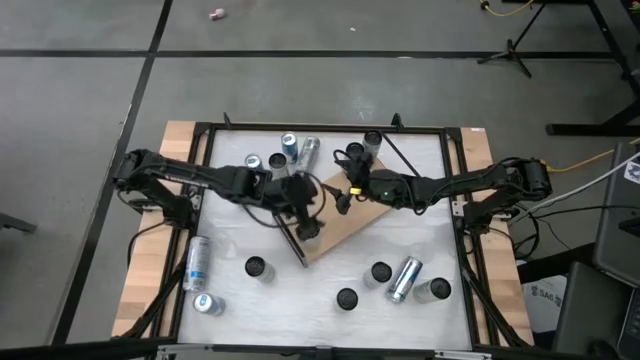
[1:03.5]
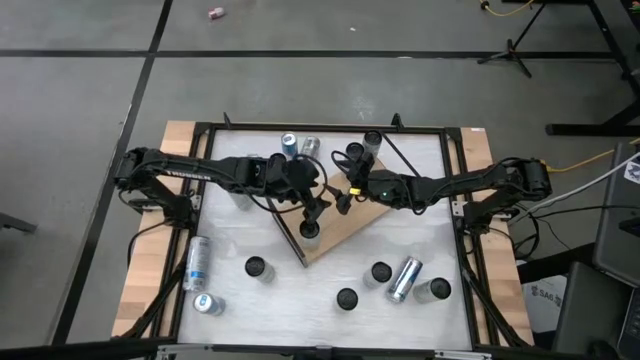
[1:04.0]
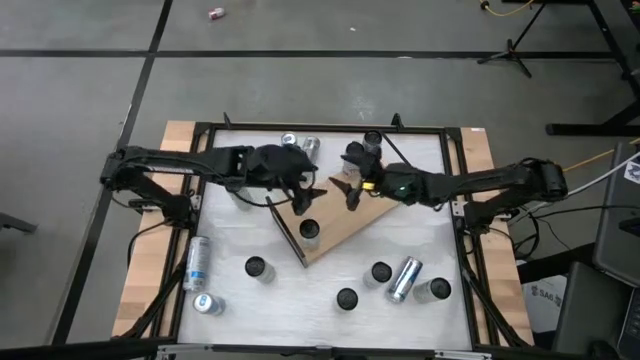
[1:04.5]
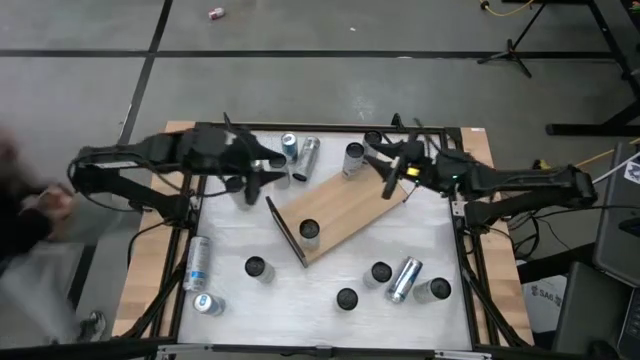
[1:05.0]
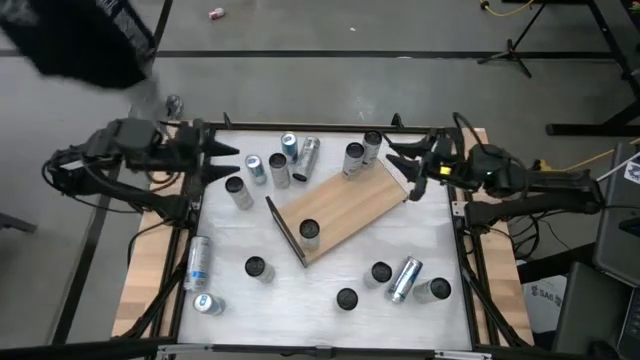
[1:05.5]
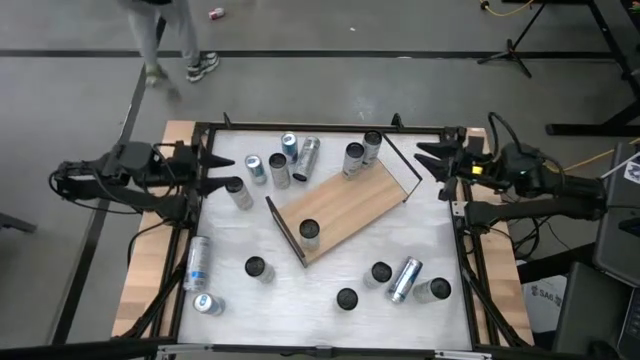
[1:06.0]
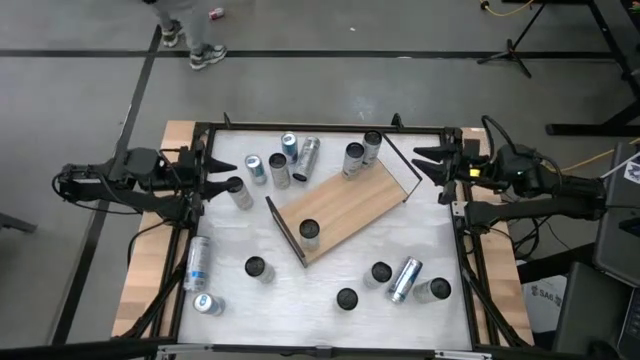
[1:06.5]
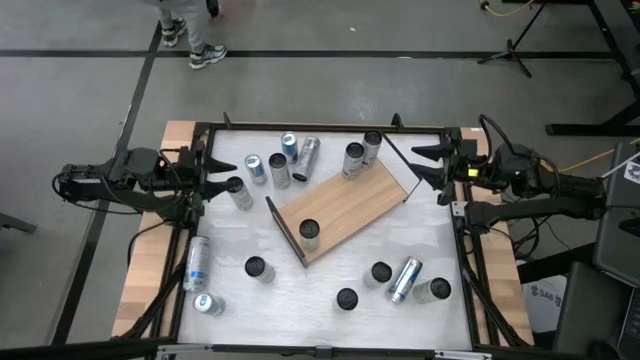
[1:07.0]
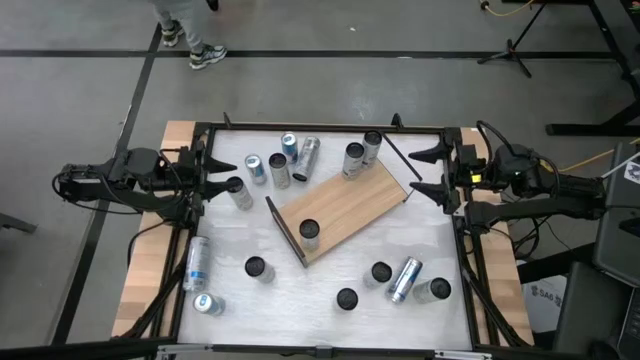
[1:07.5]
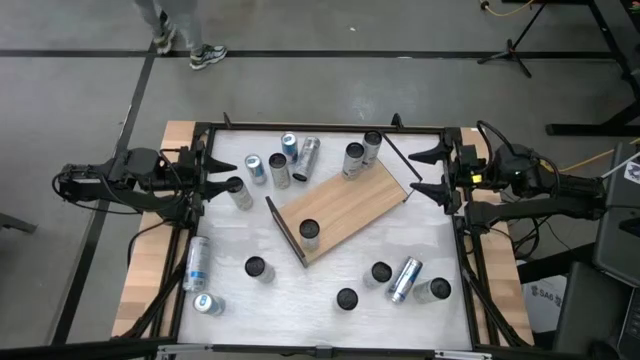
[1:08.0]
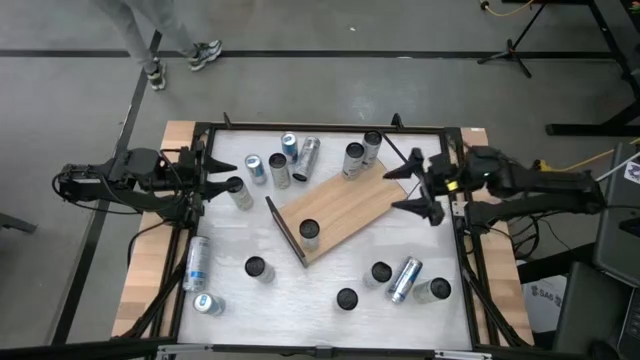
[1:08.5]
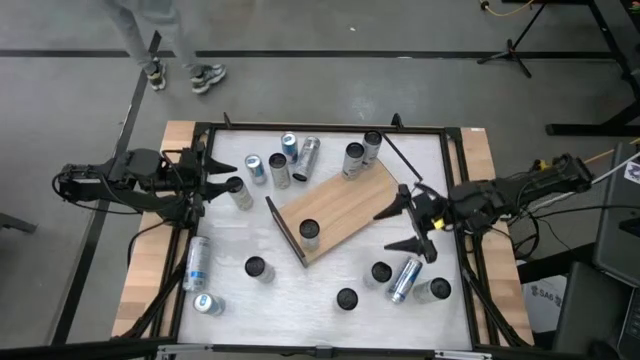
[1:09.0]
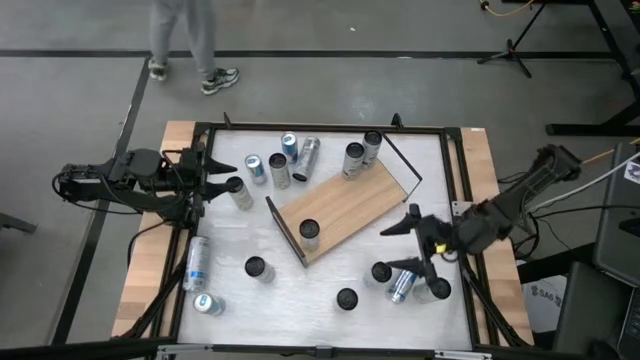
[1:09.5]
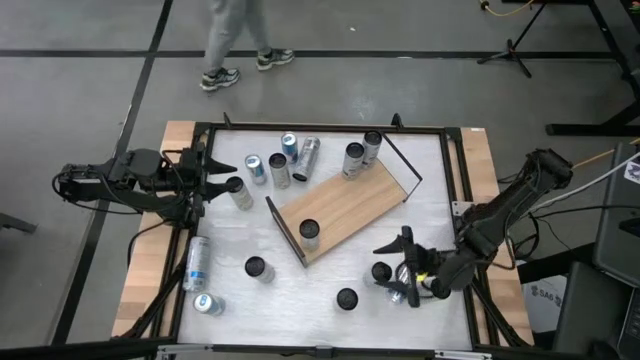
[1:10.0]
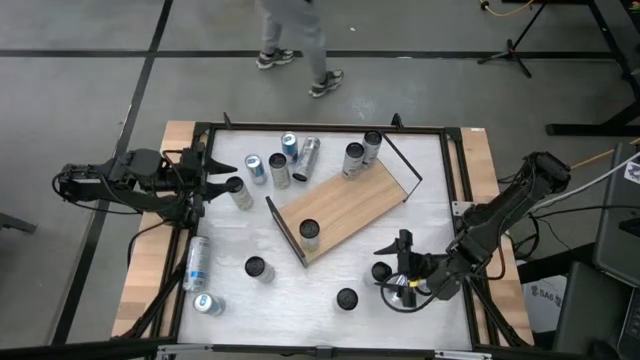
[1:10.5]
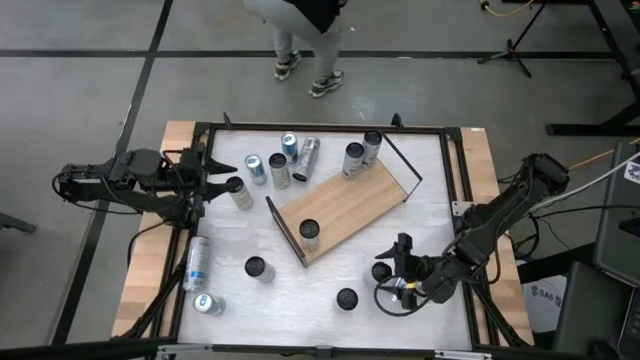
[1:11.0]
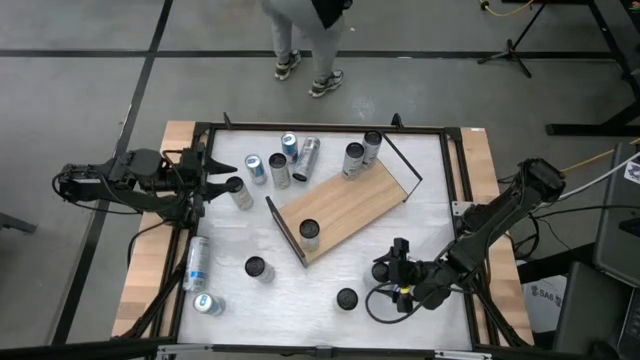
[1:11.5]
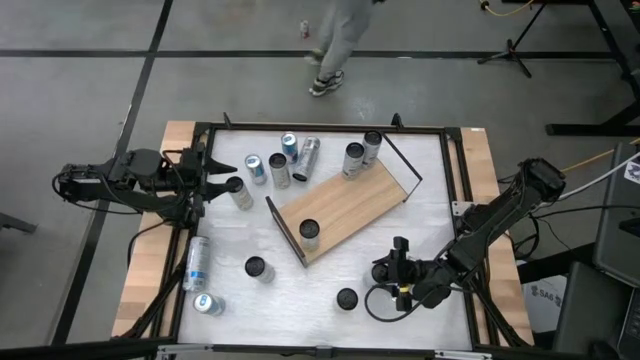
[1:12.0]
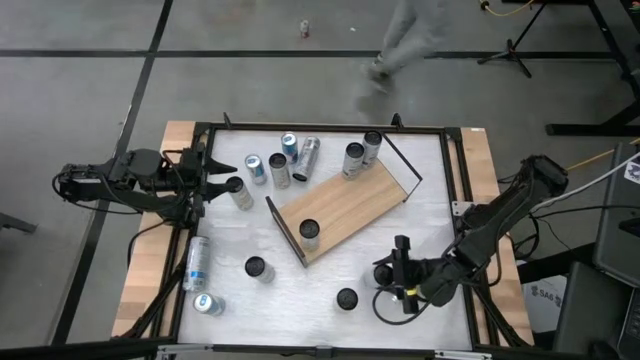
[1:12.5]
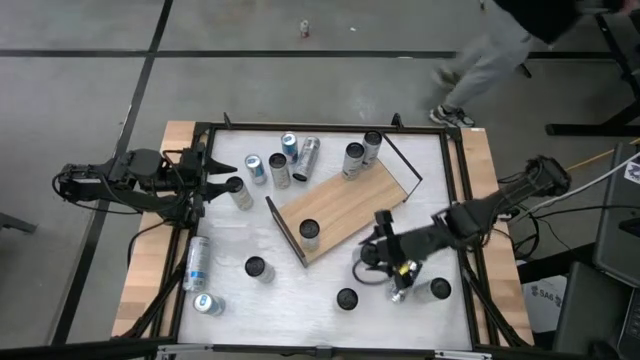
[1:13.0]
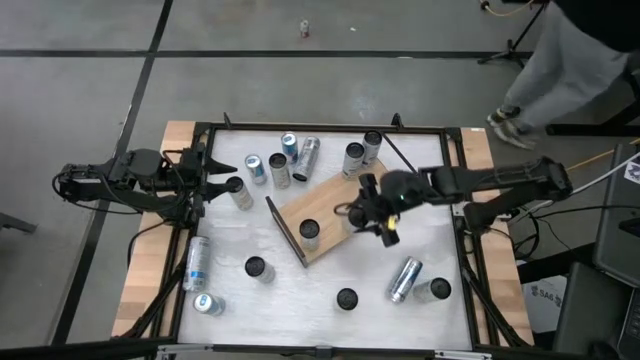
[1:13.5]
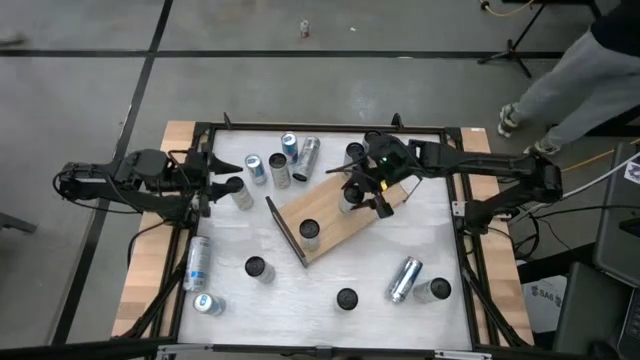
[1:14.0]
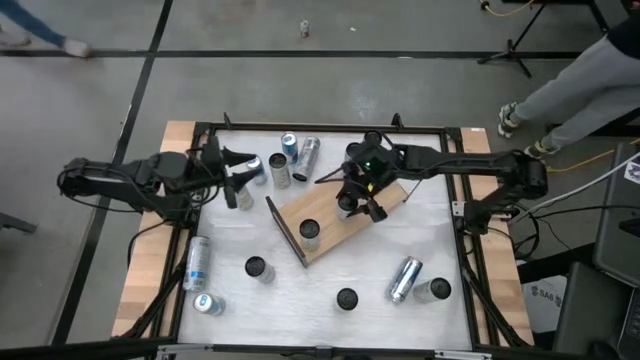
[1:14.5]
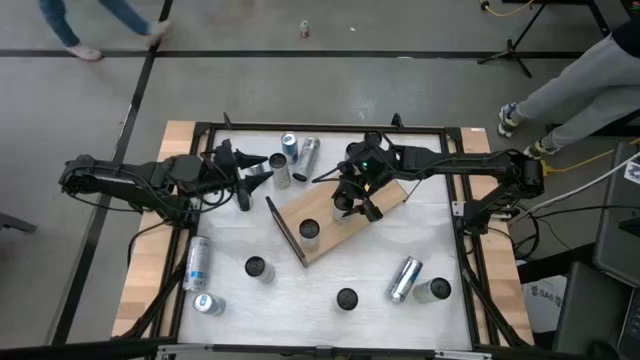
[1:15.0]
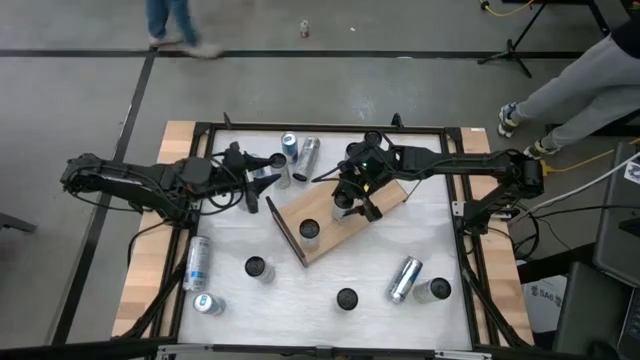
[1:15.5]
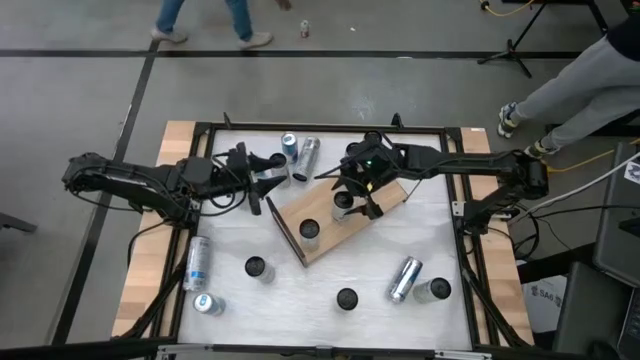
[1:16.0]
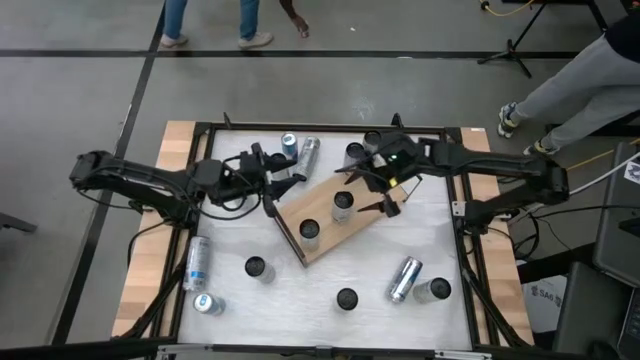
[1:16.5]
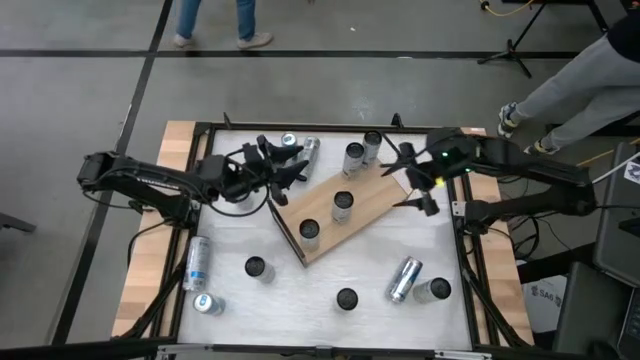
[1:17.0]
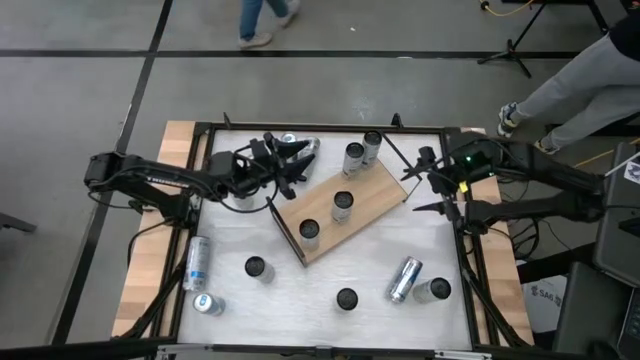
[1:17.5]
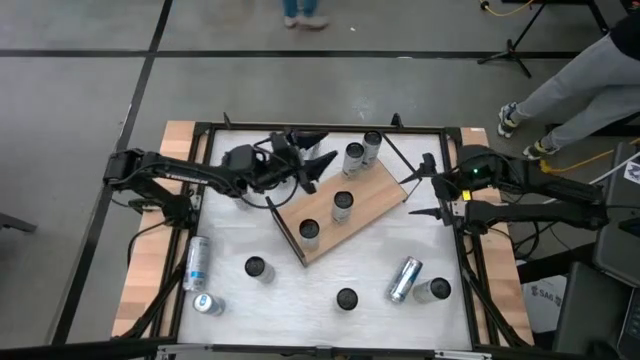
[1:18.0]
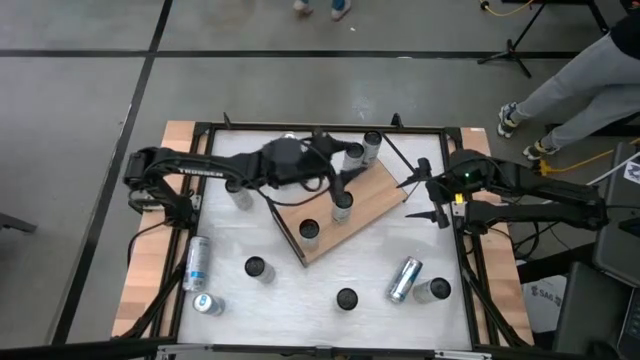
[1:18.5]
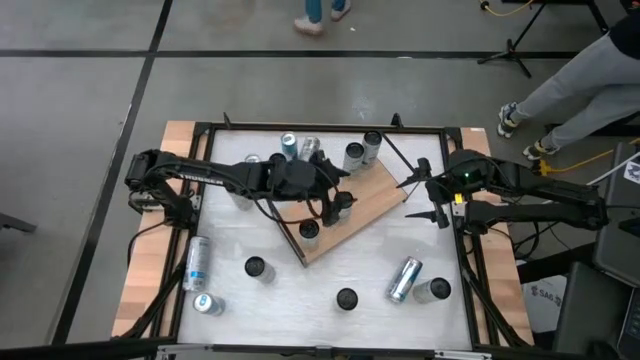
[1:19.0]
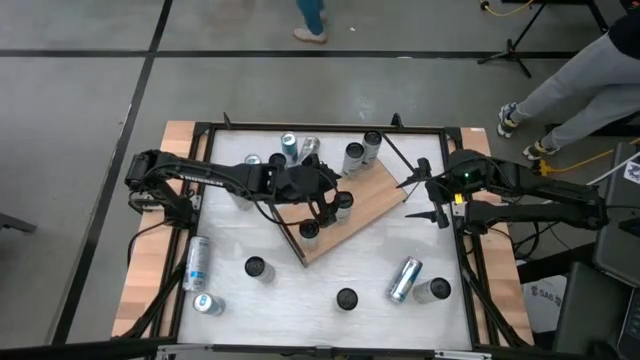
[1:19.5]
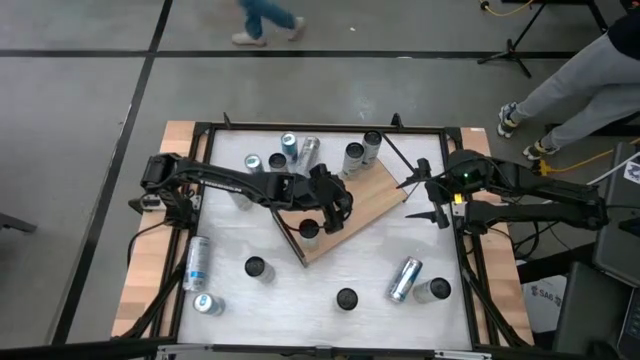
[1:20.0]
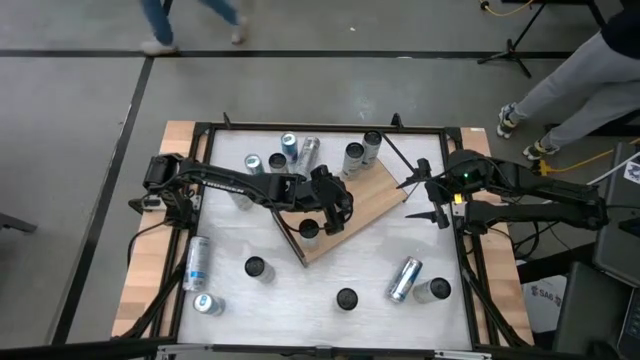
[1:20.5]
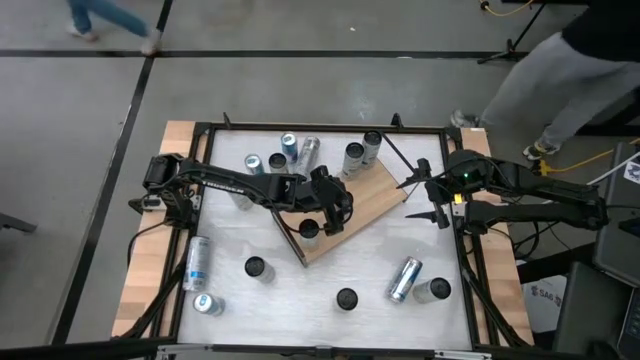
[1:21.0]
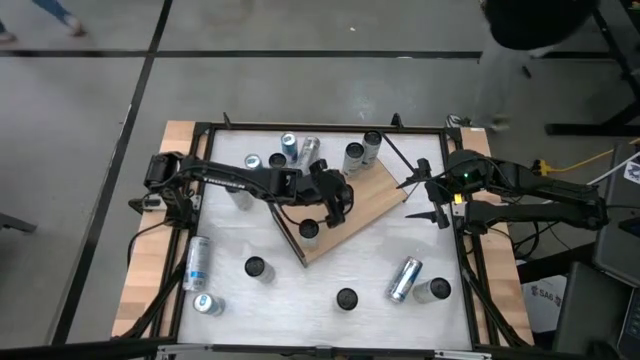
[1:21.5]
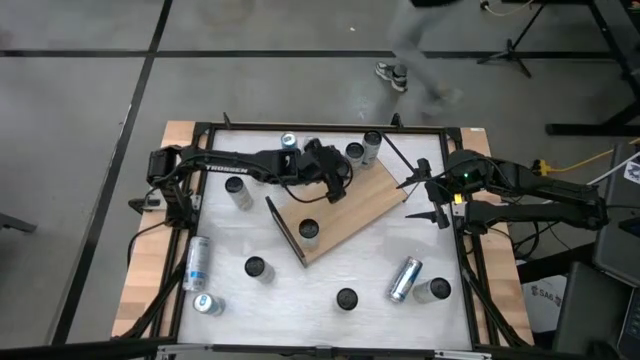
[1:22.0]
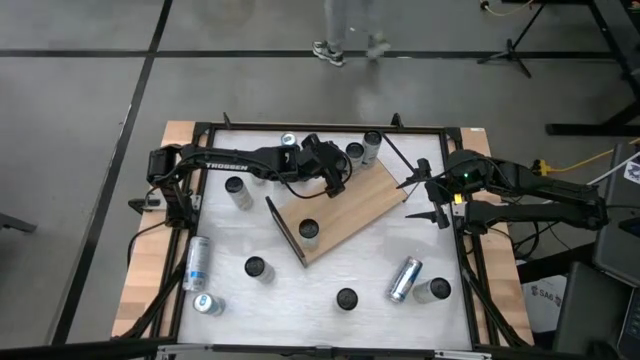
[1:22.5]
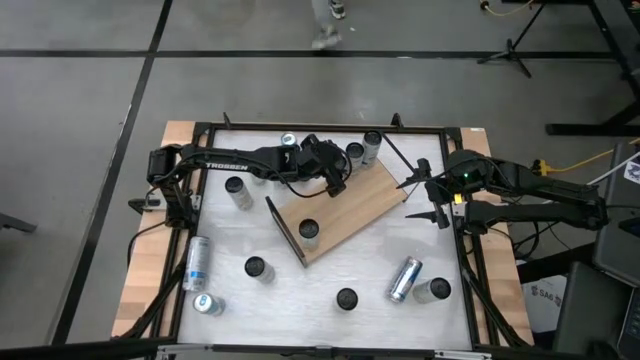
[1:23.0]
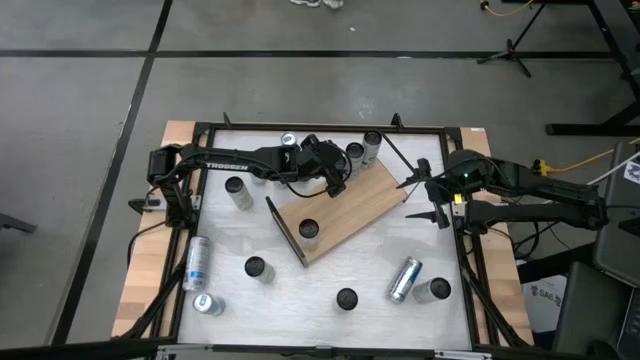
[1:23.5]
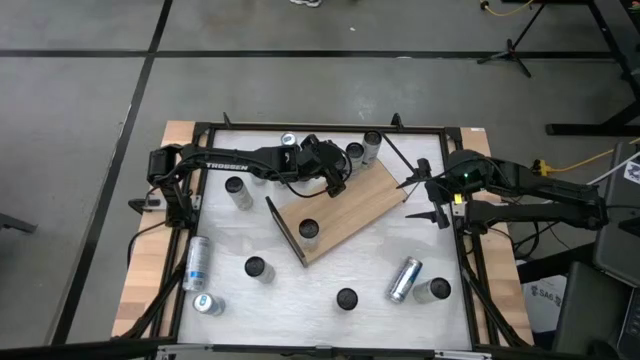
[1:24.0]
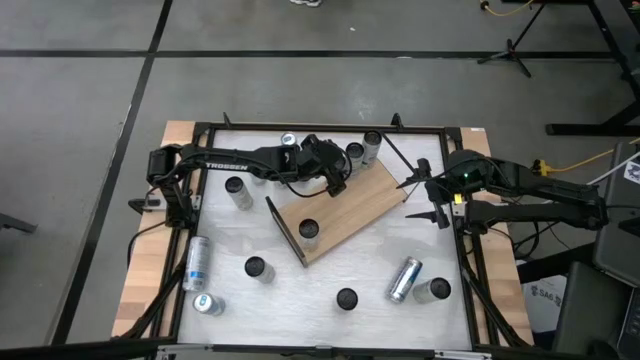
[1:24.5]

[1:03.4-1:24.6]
Task: Place canned beverage on shelf
Put the white blue soda can on the shelf
